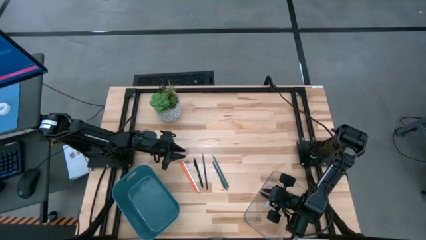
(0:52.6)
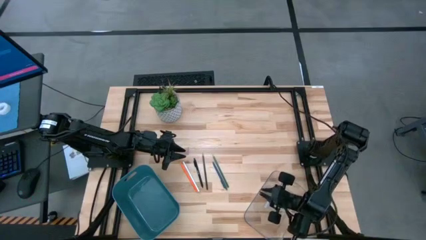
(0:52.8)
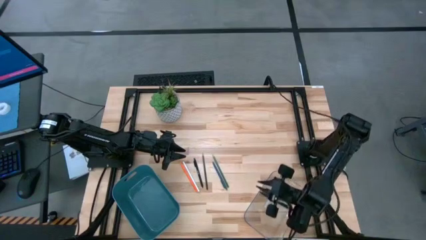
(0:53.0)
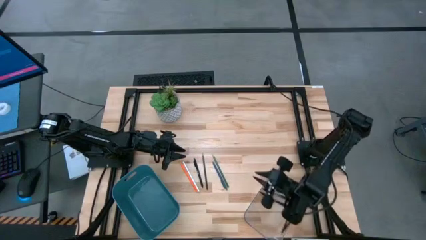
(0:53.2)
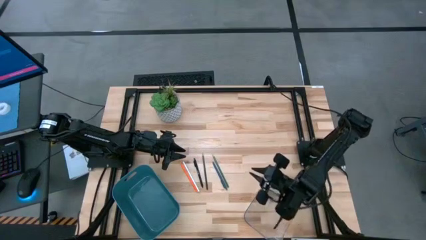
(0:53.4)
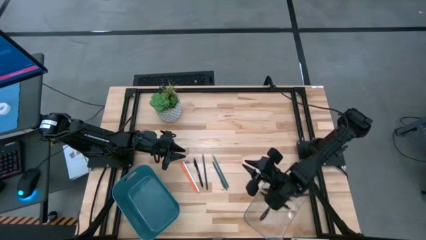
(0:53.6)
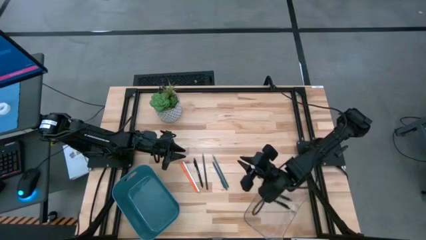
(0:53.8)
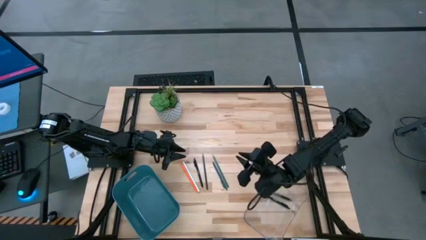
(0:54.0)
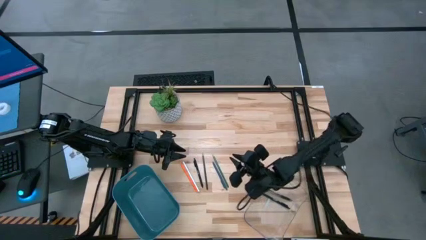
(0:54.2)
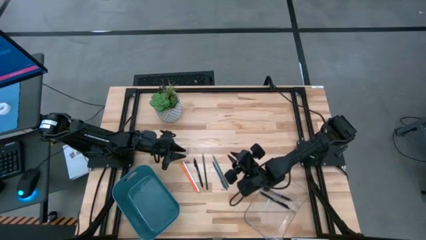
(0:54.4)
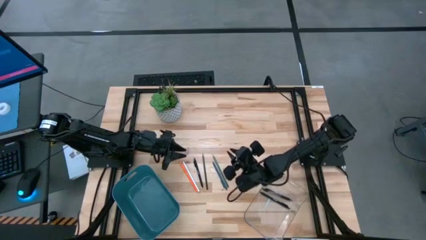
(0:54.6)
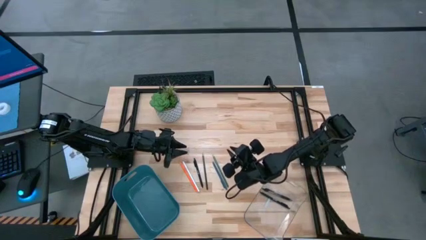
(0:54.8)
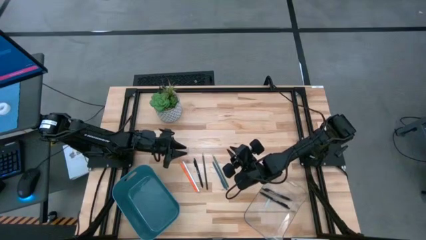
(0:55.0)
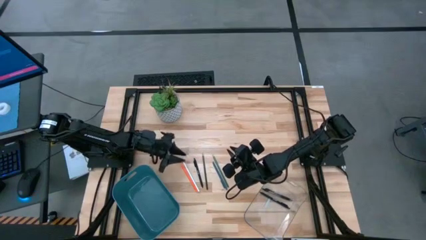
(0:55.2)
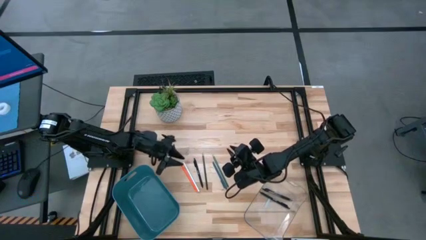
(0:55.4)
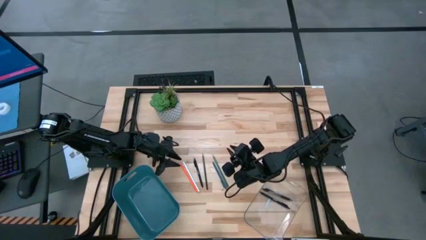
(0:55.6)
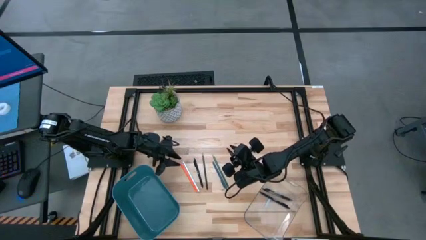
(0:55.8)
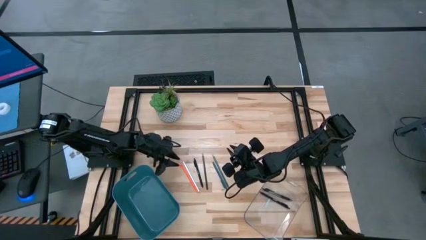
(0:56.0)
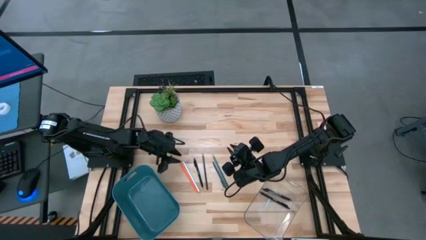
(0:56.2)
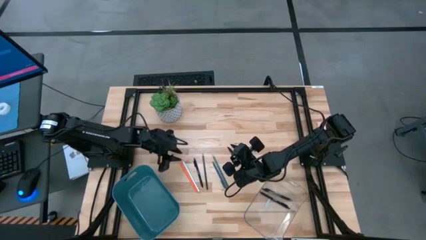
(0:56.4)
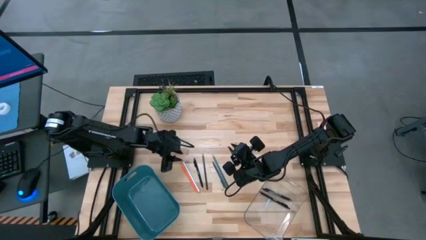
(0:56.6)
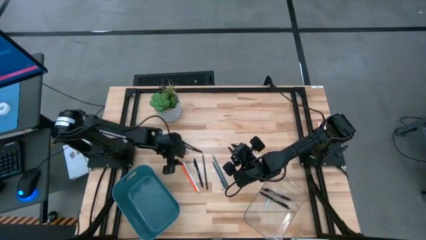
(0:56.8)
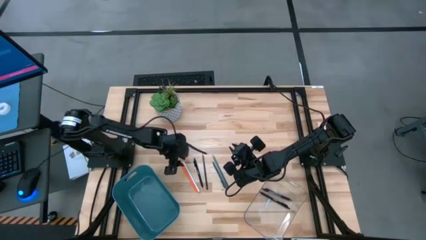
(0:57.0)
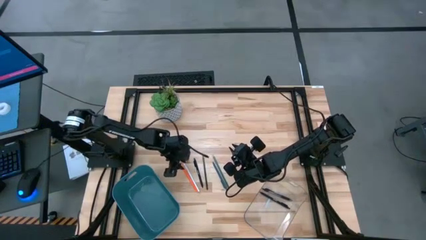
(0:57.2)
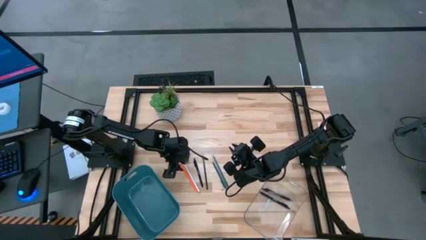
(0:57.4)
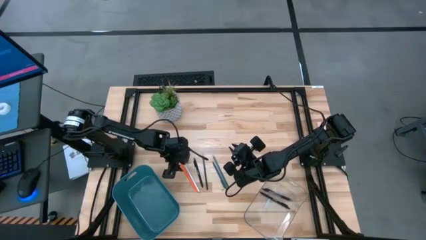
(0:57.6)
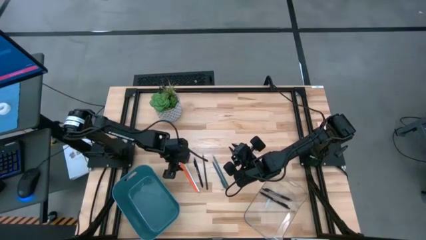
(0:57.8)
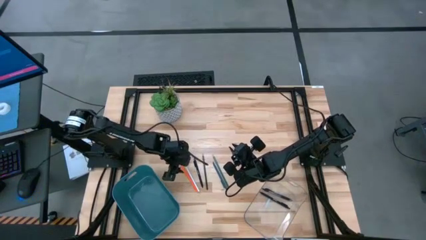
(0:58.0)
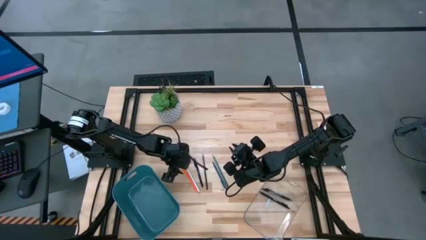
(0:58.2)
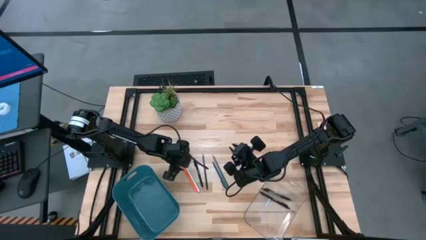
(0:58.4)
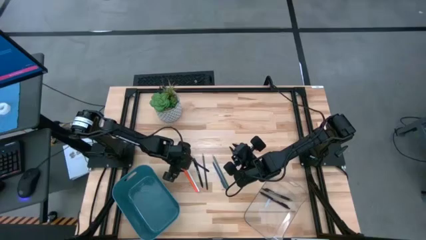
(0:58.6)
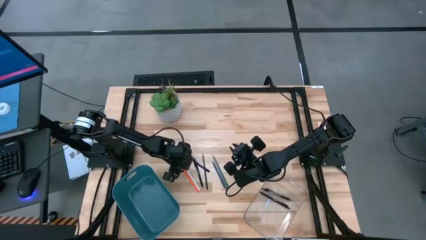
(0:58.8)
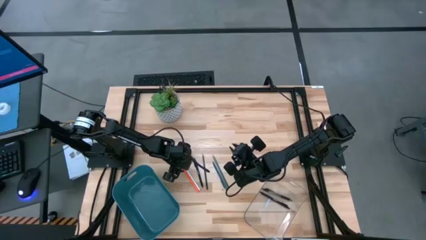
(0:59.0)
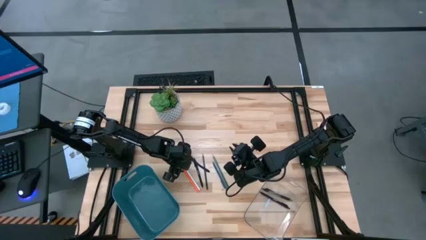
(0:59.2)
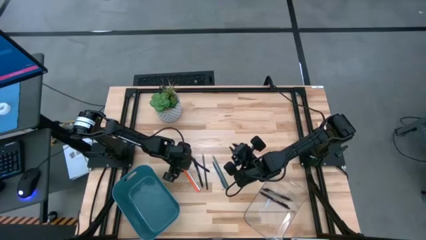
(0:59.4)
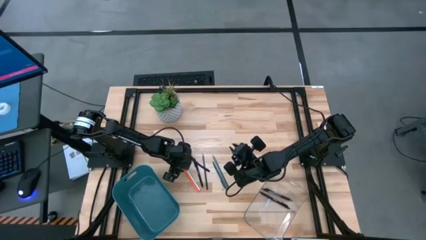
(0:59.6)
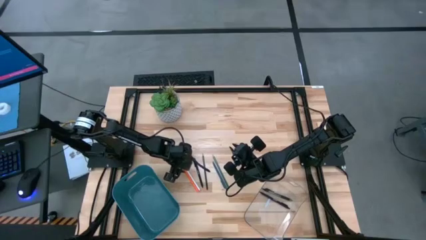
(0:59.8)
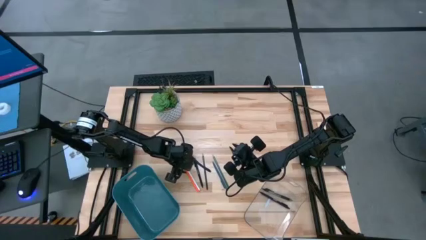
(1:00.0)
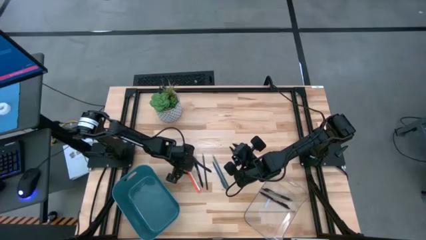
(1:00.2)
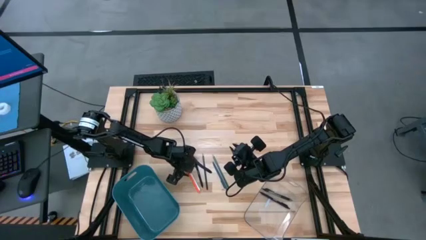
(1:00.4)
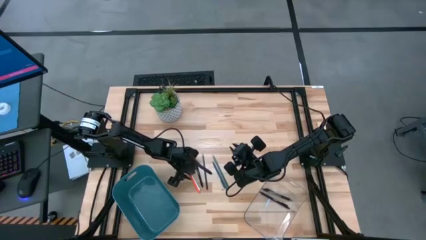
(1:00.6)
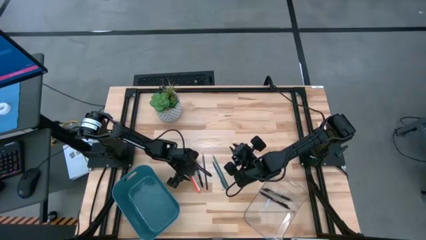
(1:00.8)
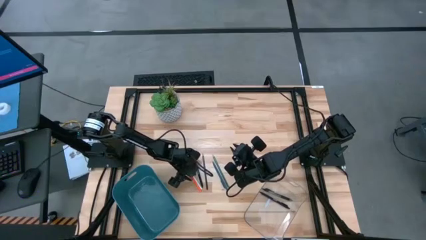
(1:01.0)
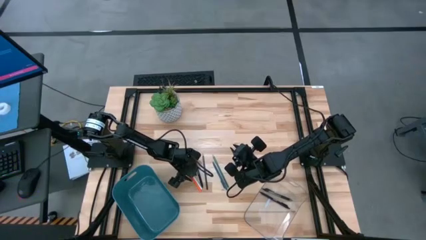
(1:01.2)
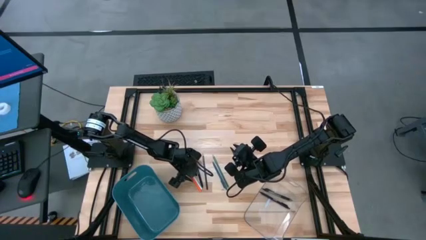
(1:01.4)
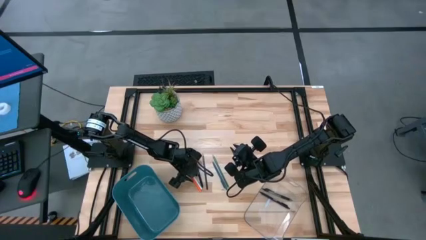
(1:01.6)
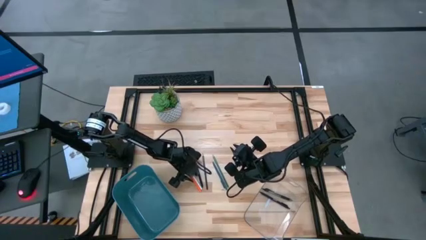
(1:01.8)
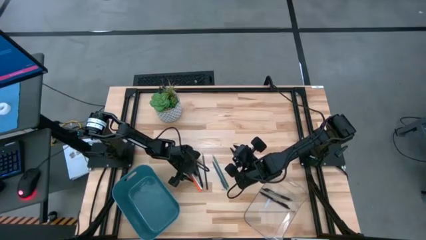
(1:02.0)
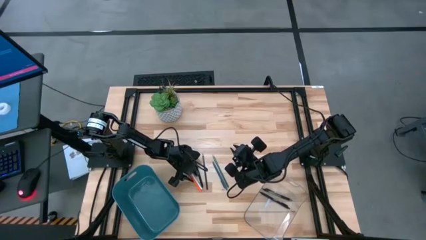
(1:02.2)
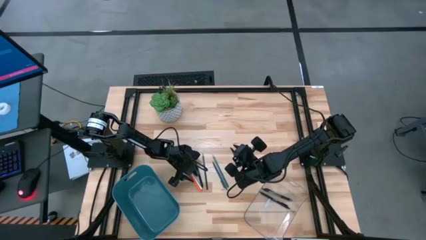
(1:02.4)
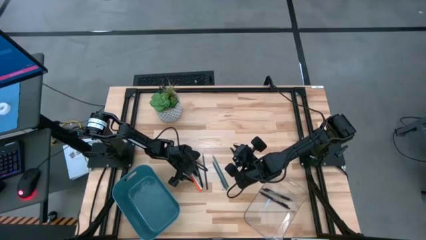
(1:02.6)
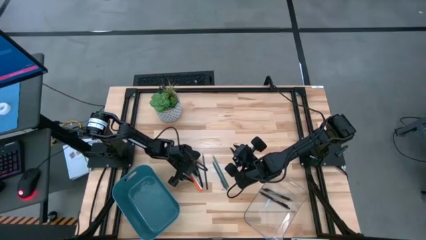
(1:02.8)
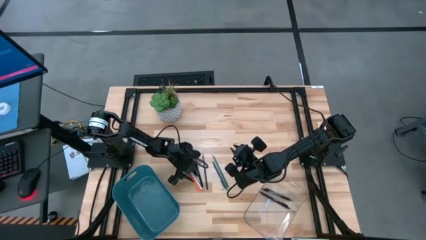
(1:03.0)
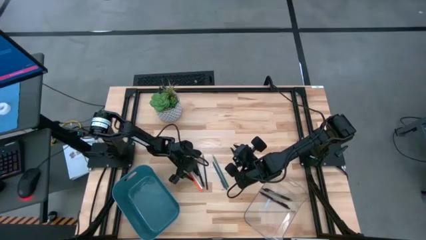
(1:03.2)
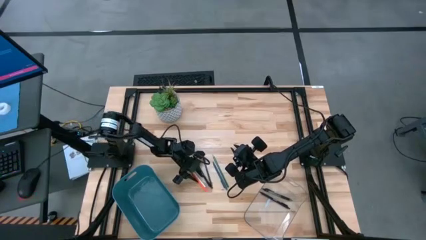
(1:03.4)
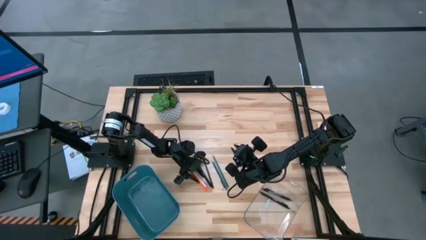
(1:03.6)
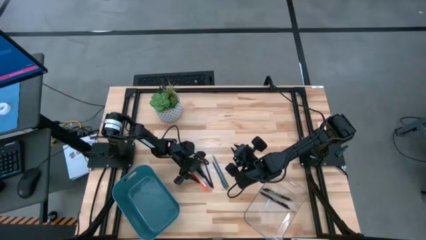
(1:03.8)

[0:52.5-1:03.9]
Task: Sort pens & pencils
Put the orange pencil into the blue bin
